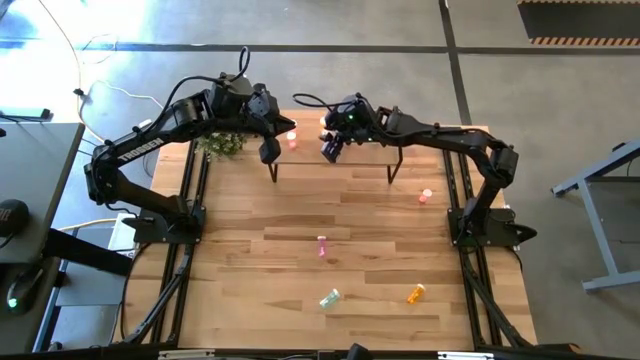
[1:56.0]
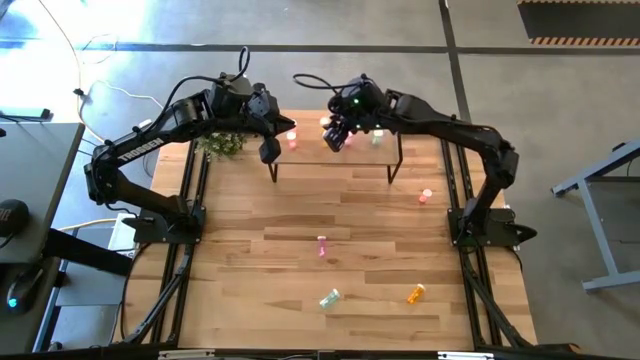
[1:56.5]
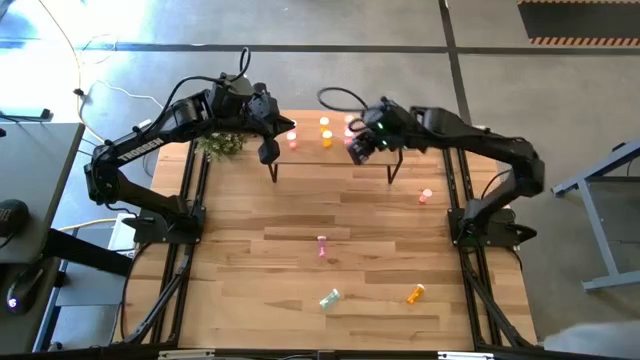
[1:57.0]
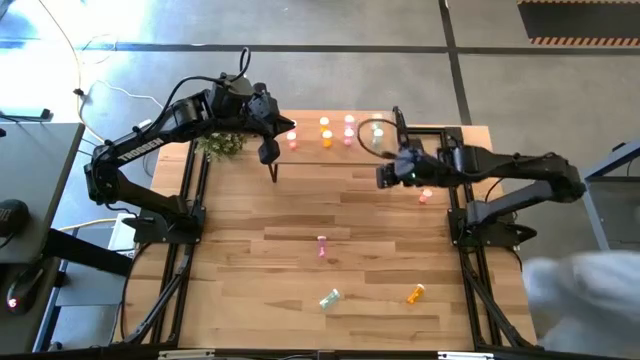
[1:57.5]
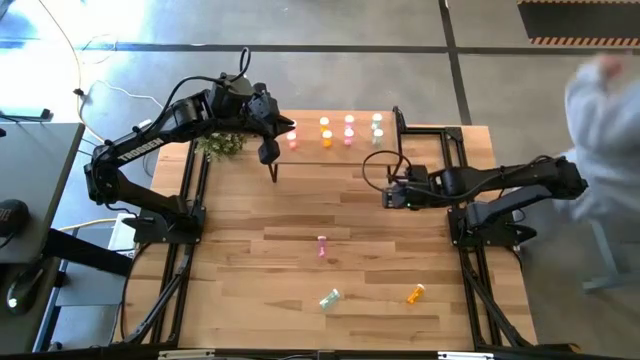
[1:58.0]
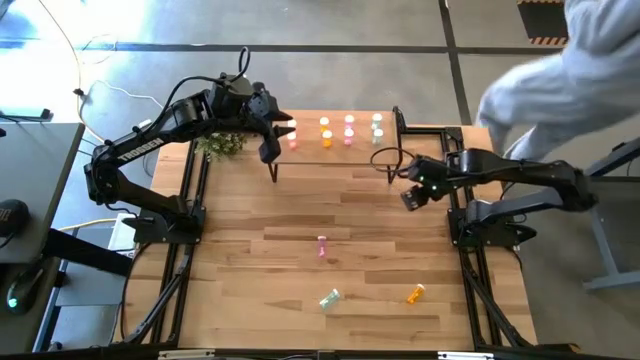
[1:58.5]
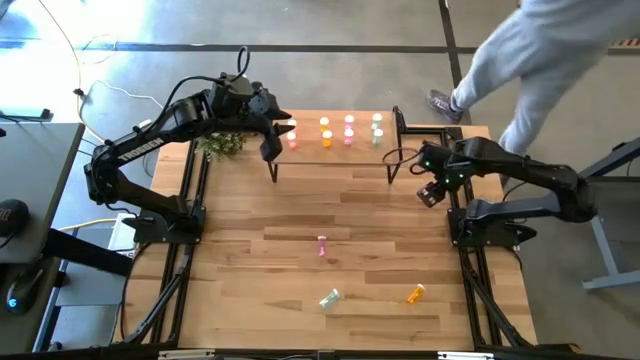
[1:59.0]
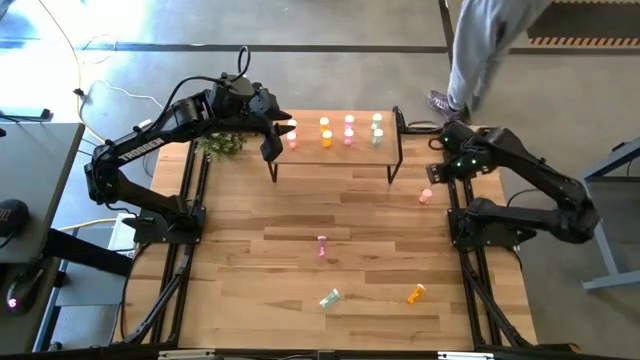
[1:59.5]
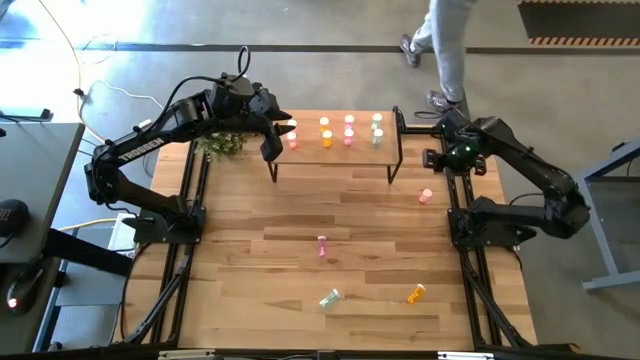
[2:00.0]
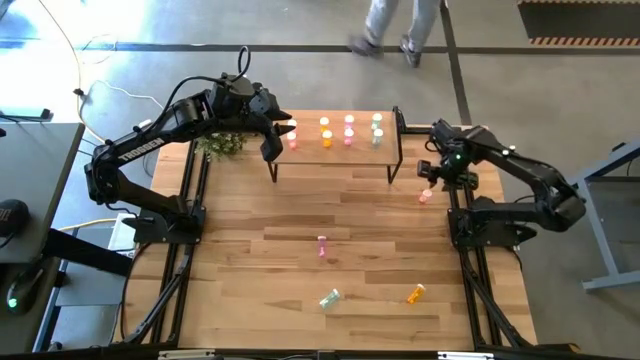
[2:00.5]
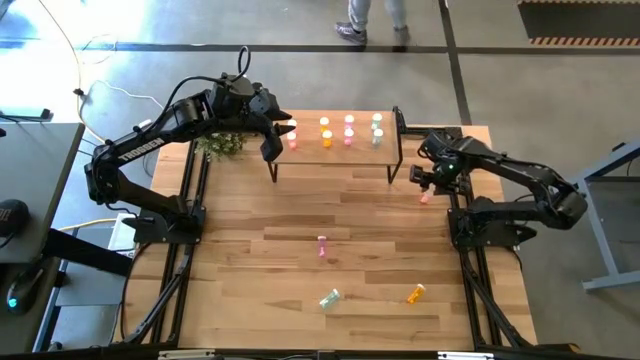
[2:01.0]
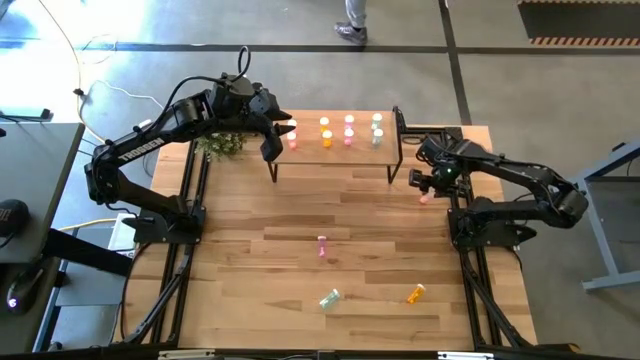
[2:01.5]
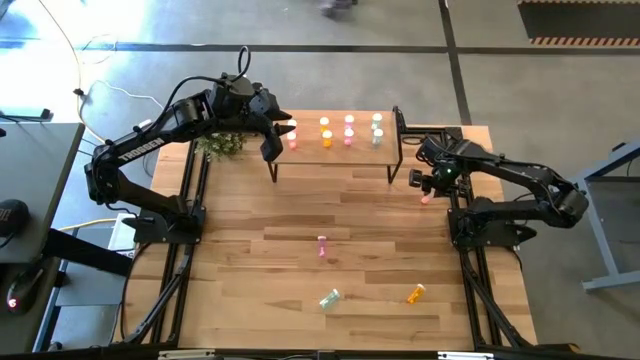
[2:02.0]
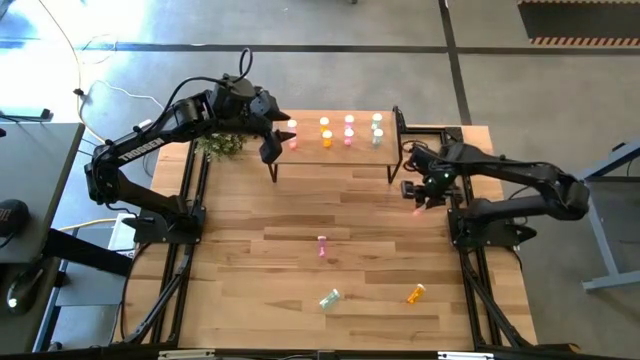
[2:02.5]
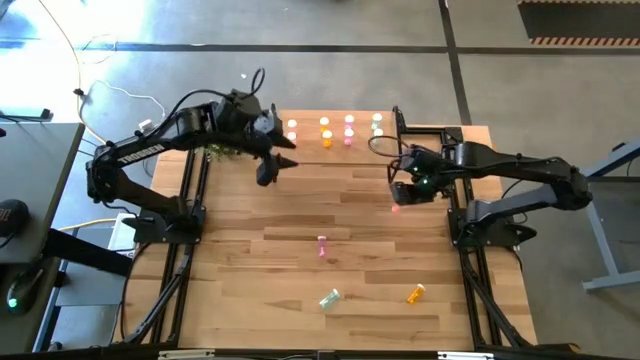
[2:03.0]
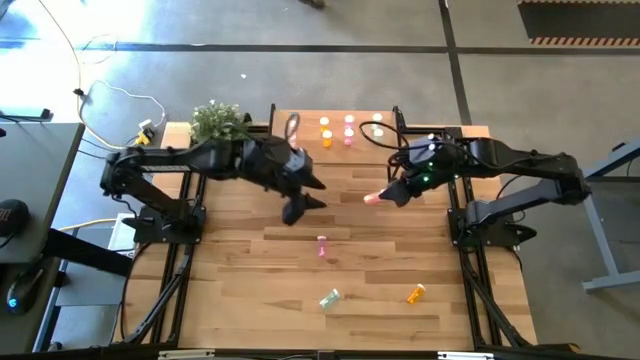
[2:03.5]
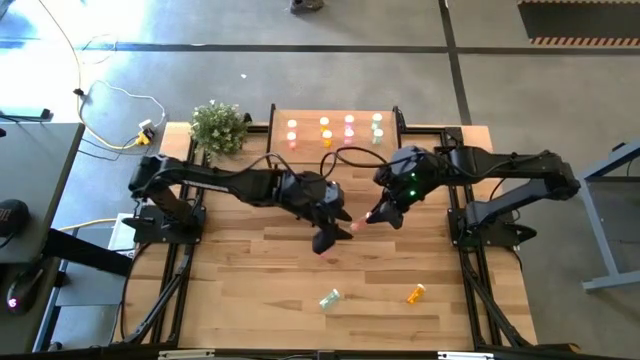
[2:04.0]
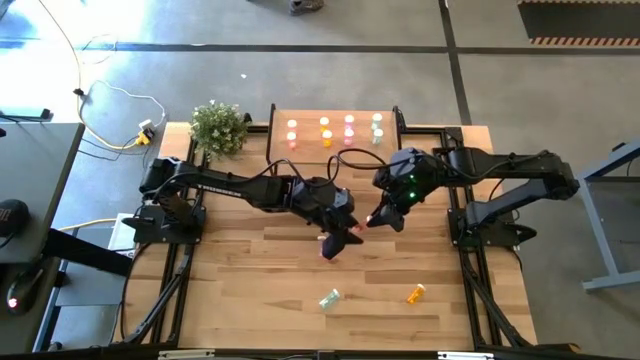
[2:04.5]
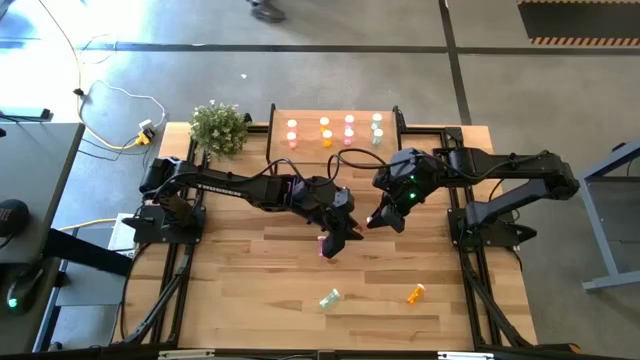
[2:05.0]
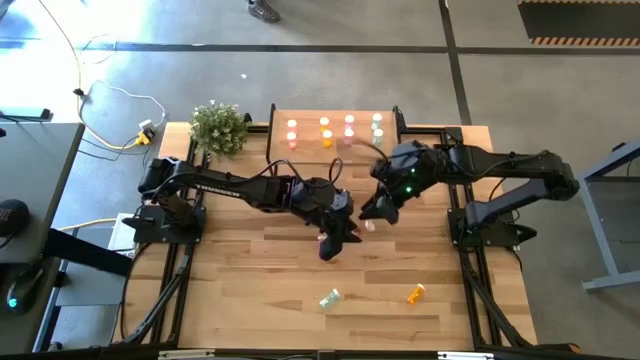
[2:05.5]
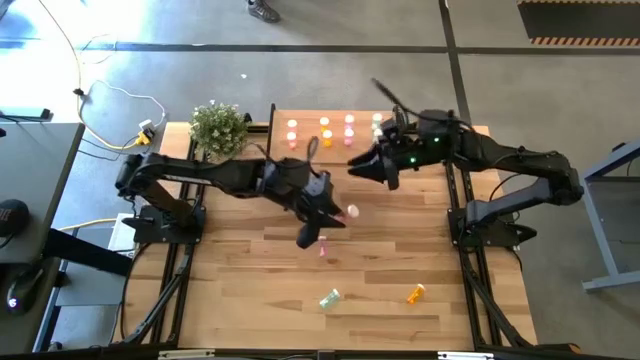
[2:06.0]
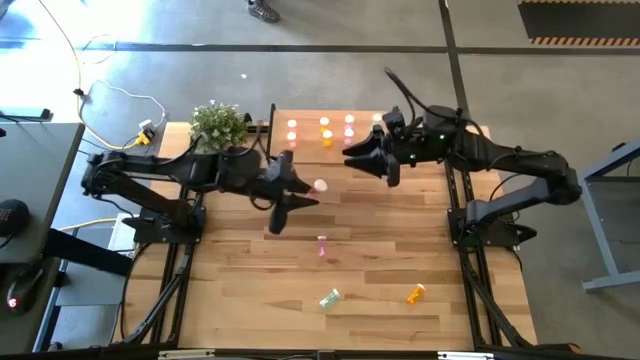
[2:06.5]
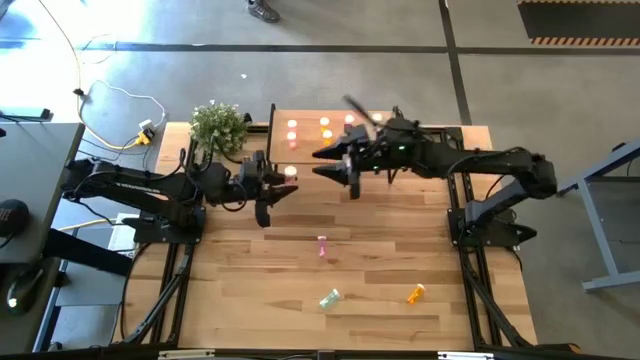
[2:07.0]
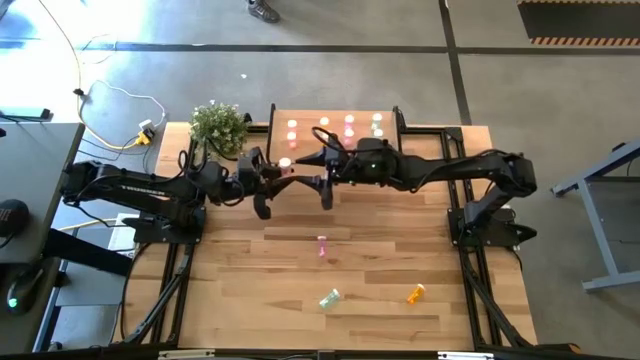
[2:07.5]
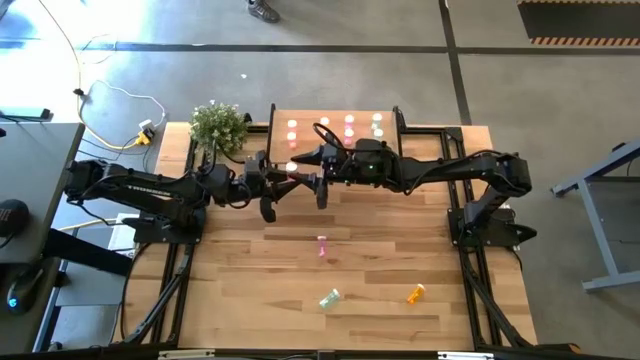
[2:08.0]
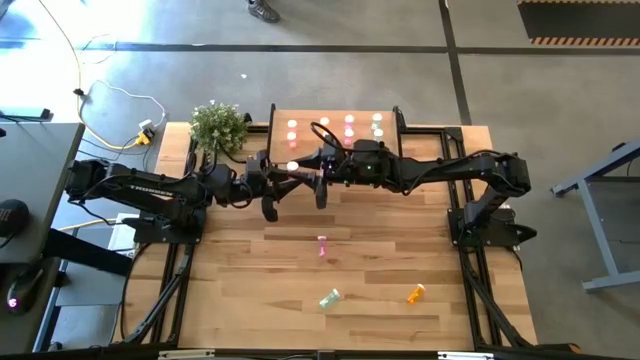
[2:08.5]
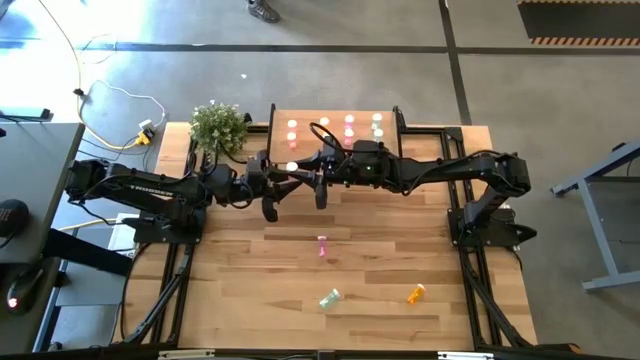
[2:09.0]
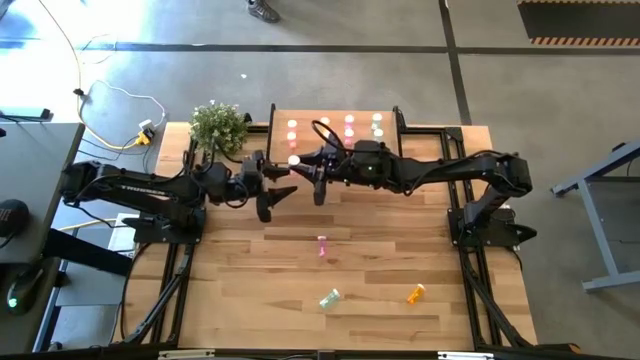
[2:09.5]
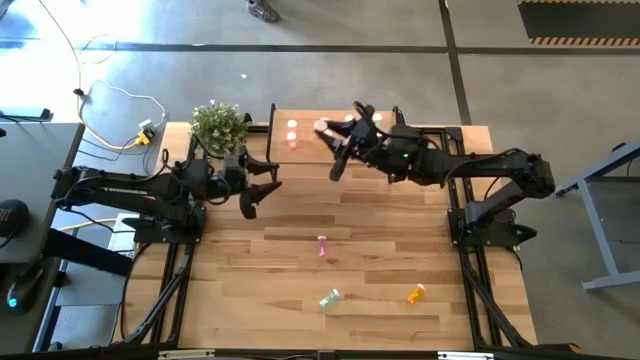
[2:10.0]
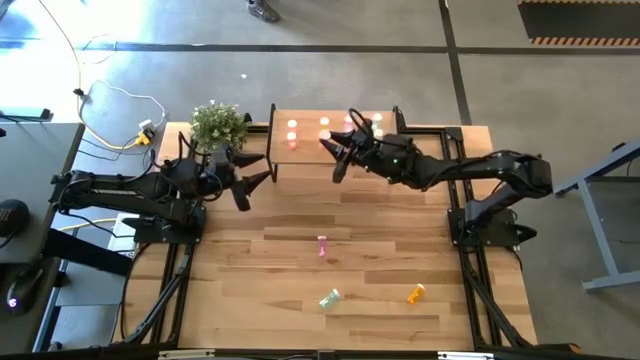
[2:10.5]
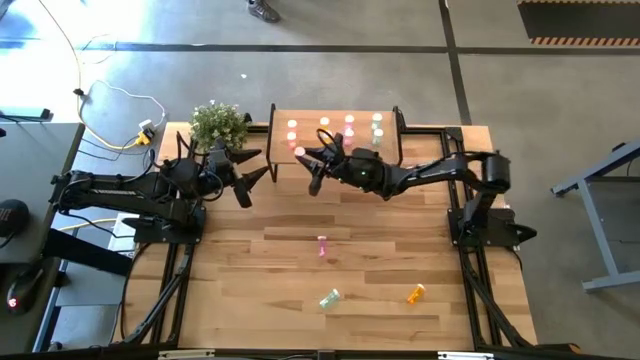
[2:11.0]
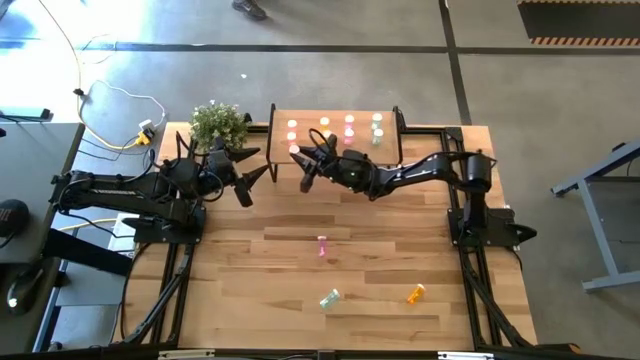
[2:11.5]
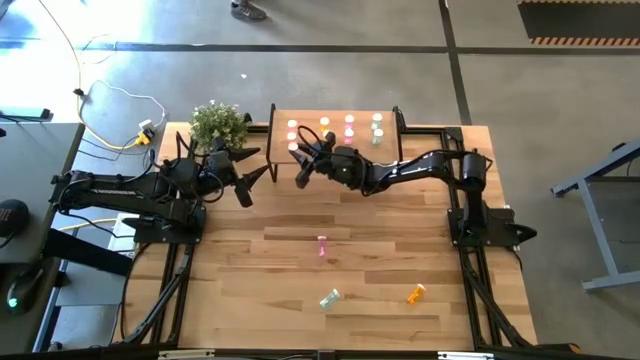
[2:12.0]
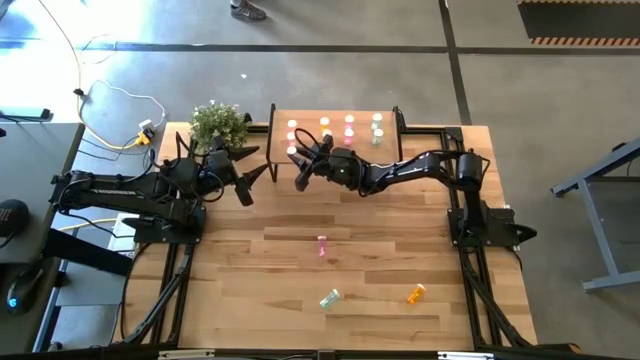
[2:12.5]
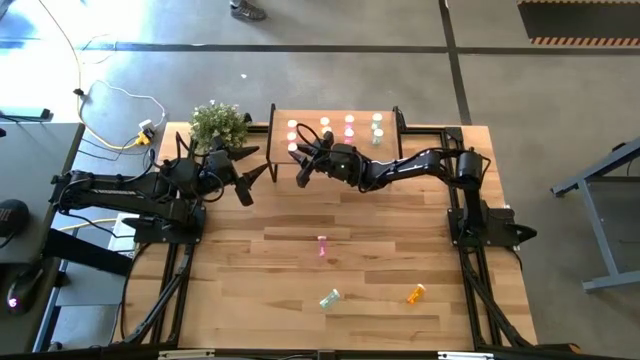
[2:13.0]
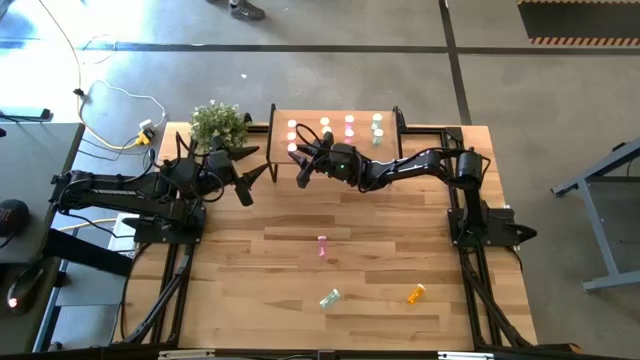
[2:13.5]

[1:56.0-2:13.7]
Task: Pick and place medicine bottles onto shelf by color
Put the pink pill bottle on the shelf aligned with the other pink pill bottles

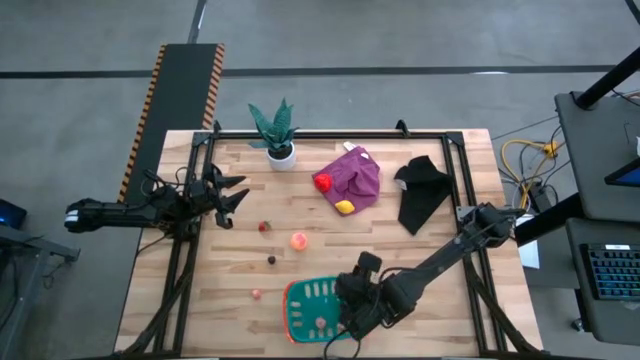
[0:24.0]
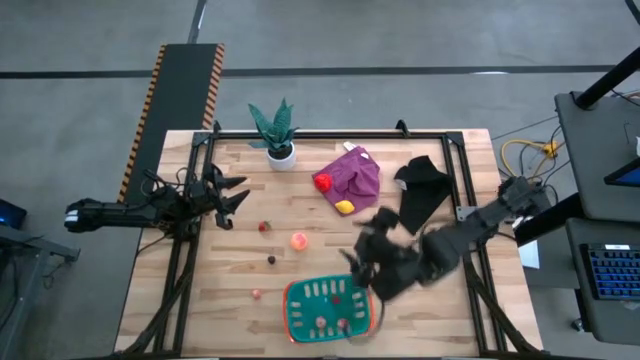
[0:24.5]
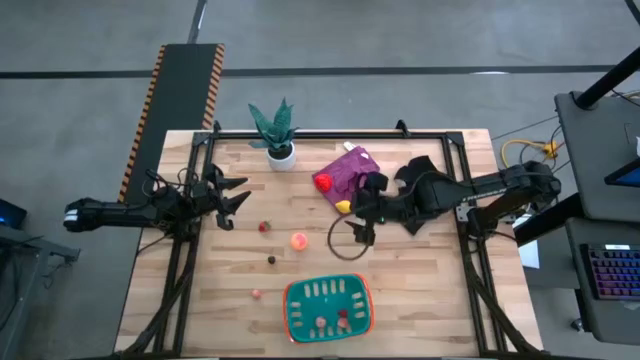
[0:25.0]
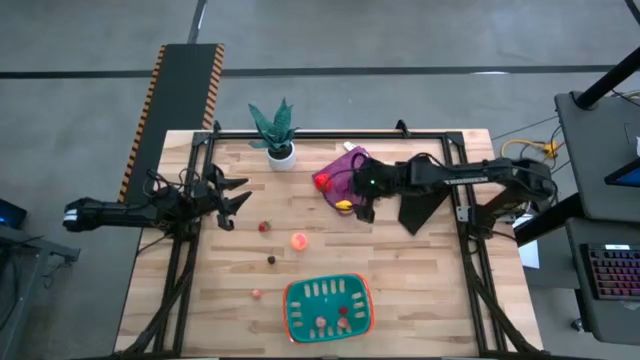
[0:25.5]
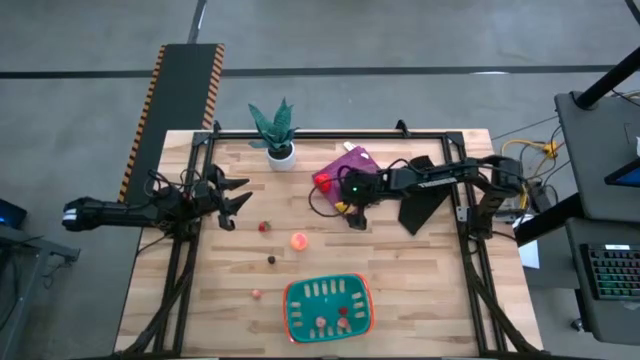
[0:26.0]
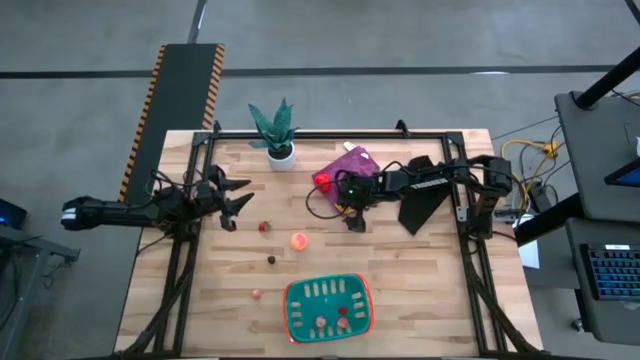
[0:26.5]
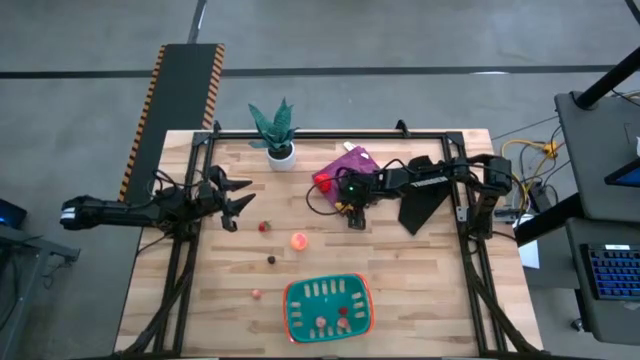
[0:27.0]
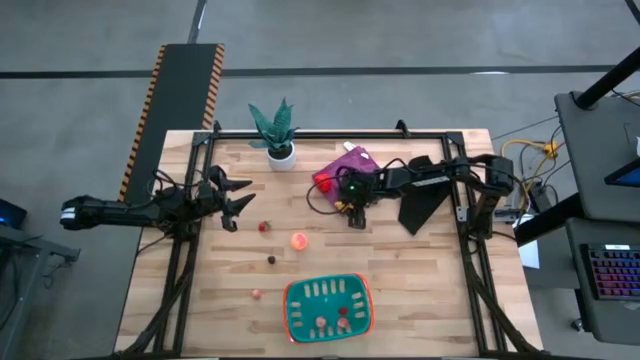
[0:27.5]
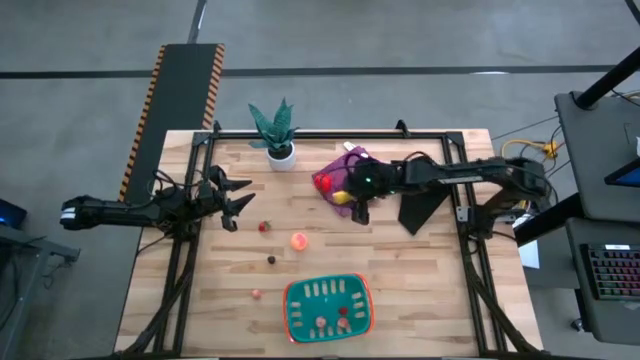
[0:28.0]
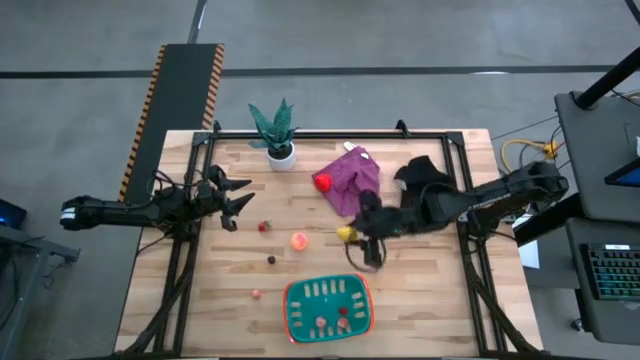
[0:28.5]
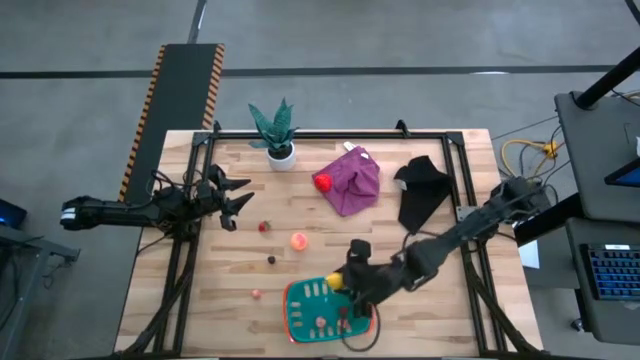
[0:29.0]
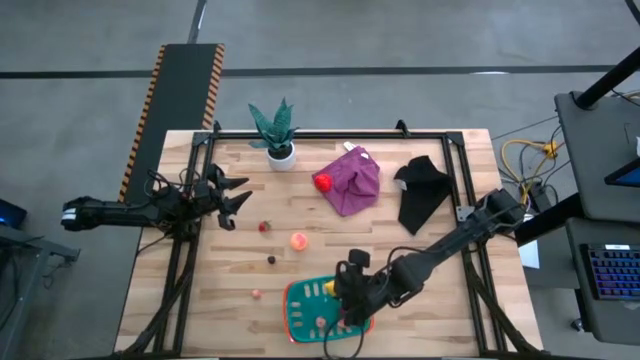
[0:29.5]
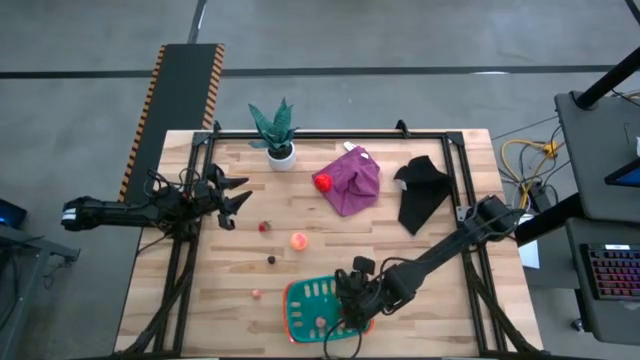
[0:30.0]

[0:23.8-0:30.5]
Task: Pick and placing Produce into tupperware
Put the yellow lemon into the green basket
